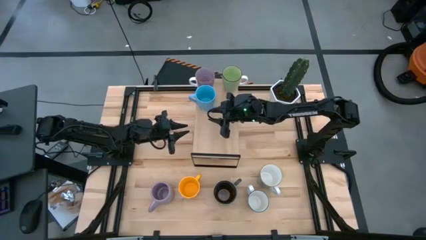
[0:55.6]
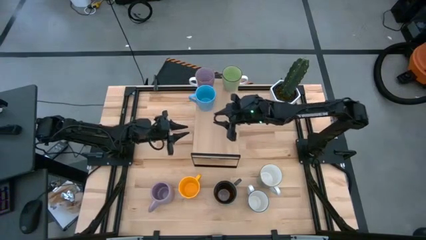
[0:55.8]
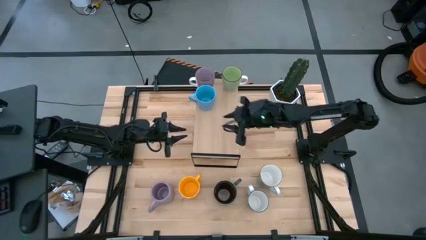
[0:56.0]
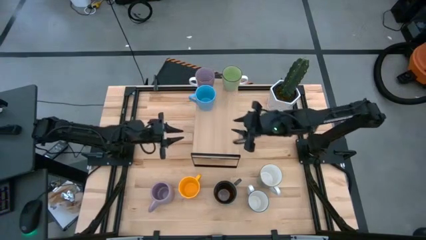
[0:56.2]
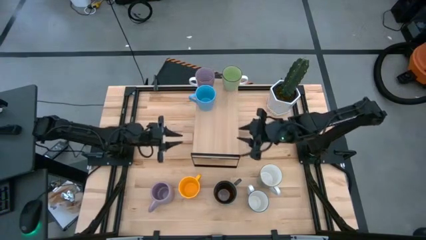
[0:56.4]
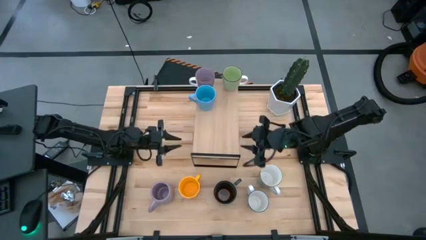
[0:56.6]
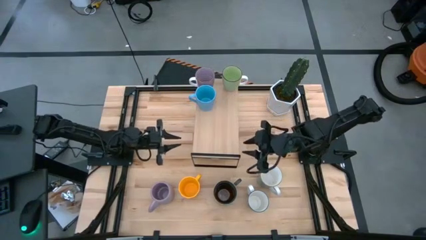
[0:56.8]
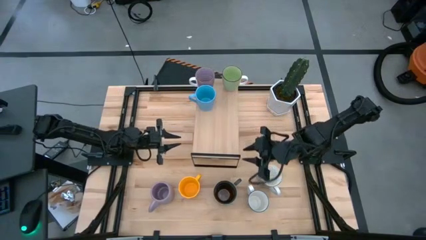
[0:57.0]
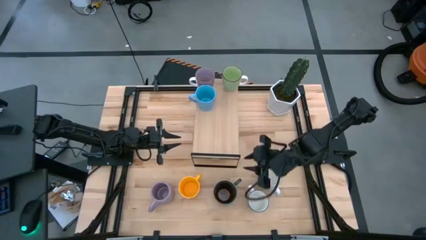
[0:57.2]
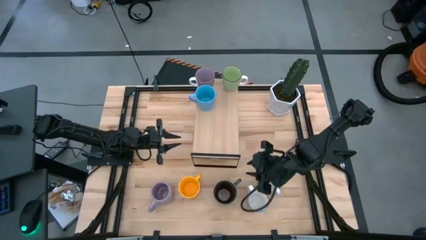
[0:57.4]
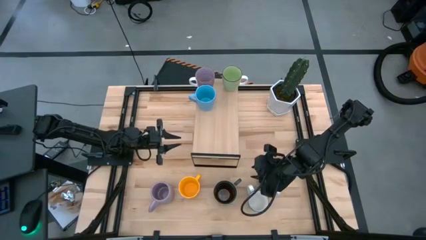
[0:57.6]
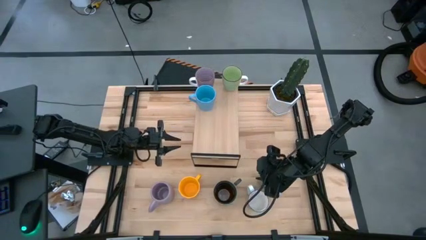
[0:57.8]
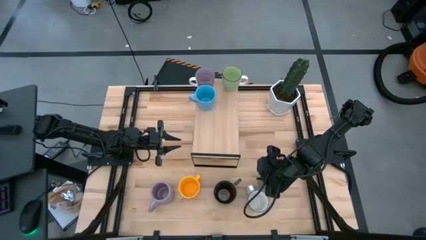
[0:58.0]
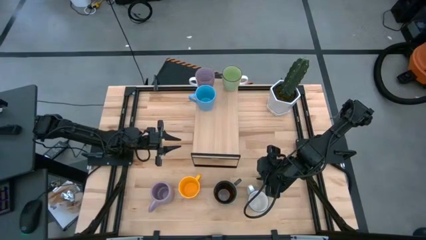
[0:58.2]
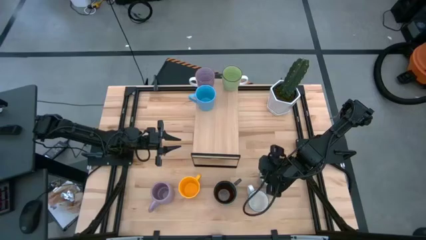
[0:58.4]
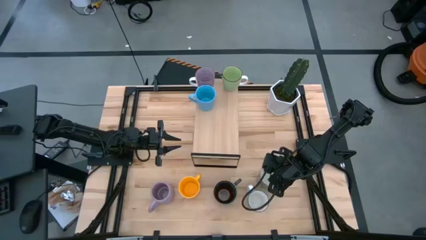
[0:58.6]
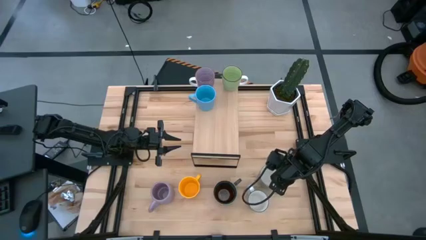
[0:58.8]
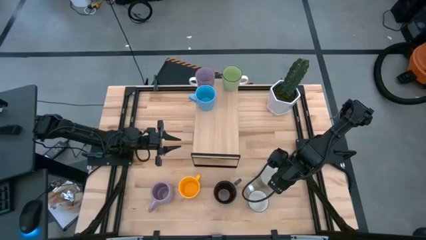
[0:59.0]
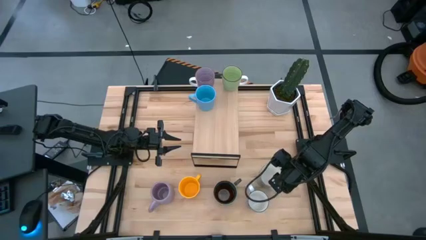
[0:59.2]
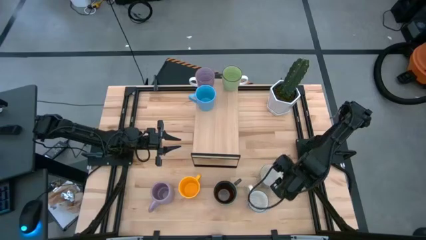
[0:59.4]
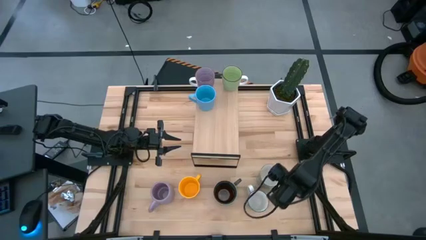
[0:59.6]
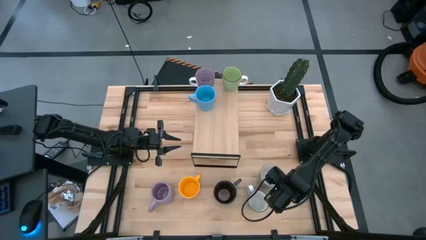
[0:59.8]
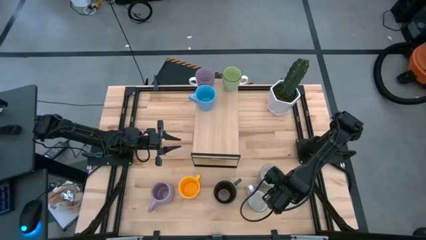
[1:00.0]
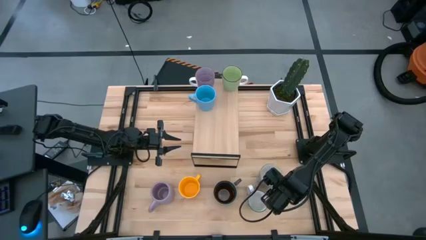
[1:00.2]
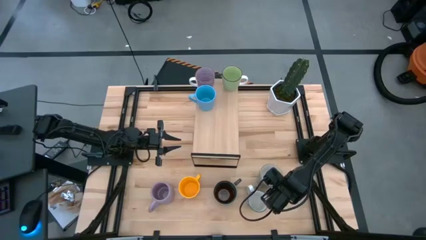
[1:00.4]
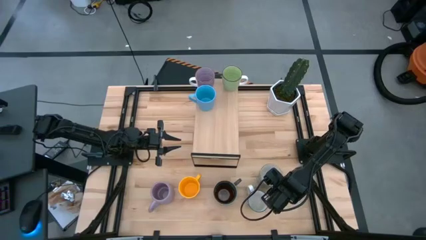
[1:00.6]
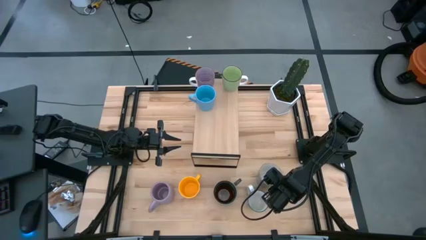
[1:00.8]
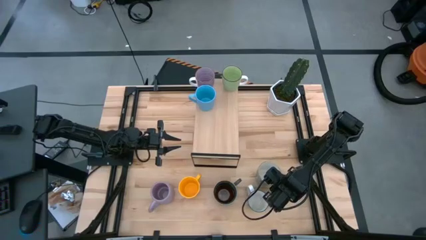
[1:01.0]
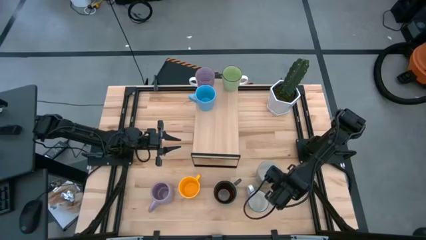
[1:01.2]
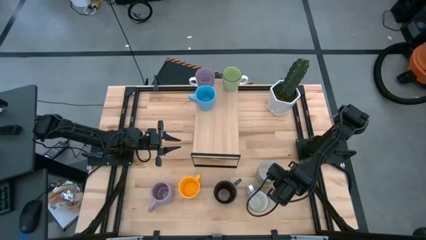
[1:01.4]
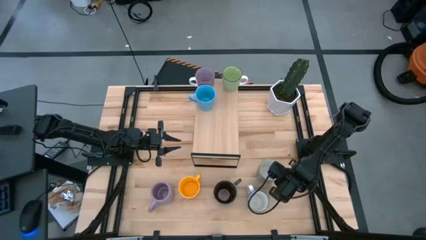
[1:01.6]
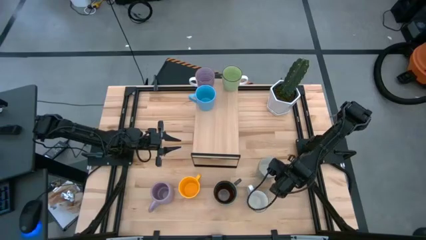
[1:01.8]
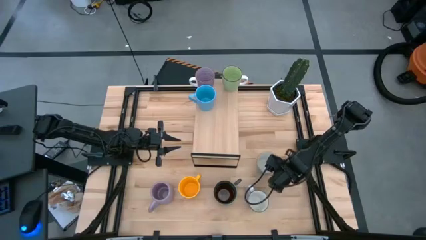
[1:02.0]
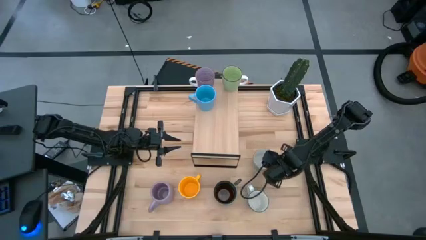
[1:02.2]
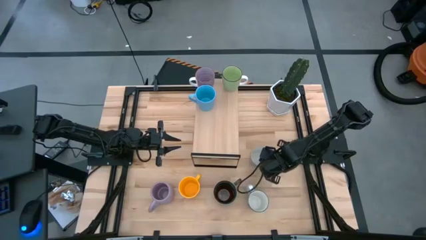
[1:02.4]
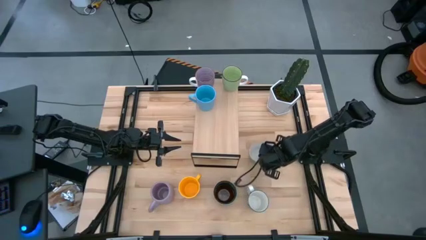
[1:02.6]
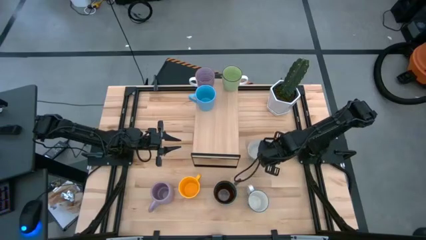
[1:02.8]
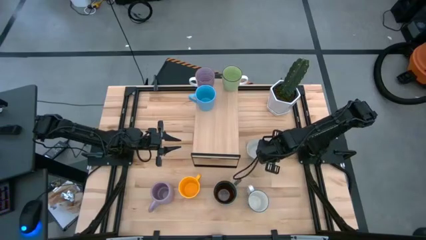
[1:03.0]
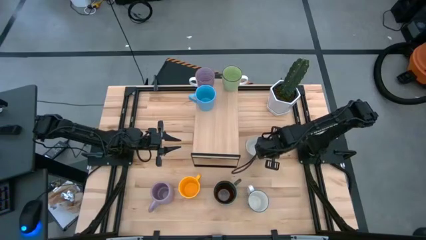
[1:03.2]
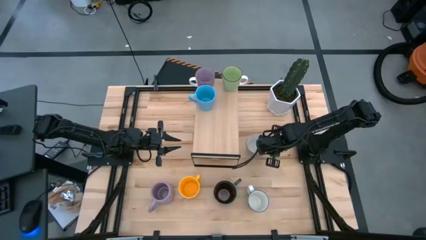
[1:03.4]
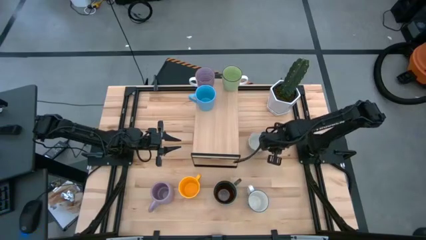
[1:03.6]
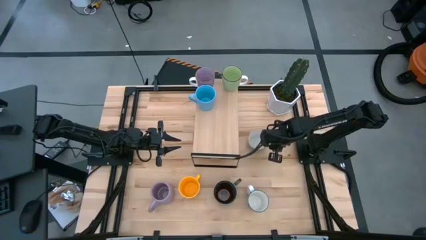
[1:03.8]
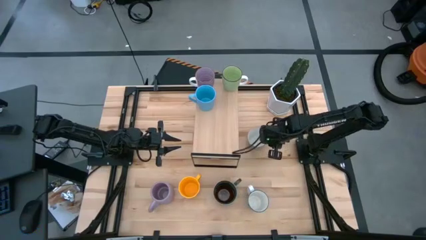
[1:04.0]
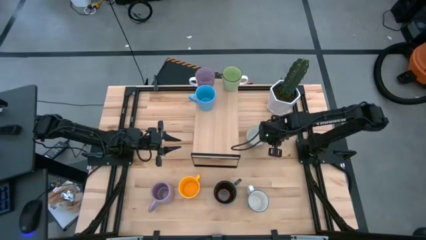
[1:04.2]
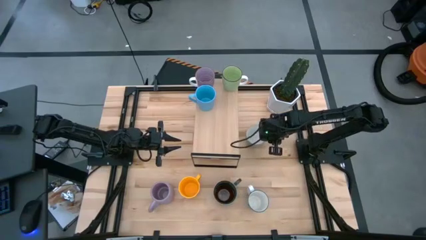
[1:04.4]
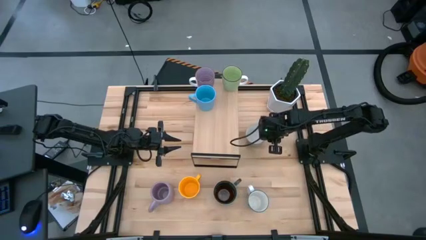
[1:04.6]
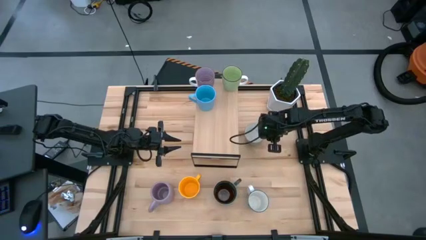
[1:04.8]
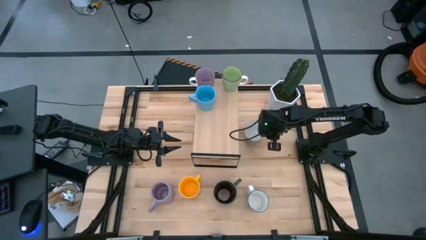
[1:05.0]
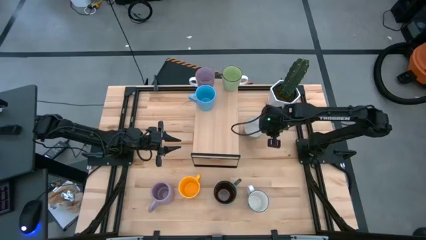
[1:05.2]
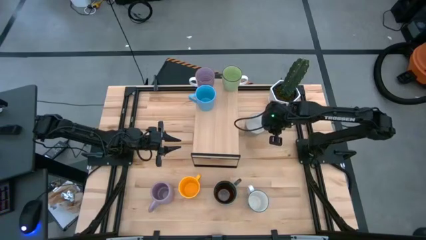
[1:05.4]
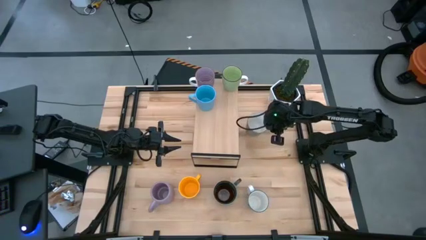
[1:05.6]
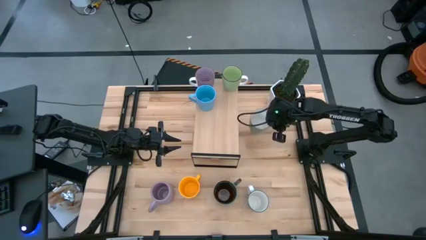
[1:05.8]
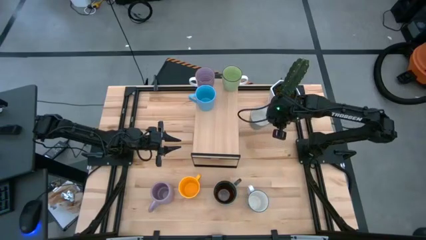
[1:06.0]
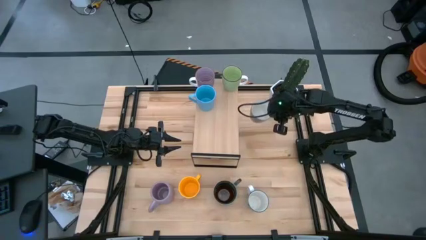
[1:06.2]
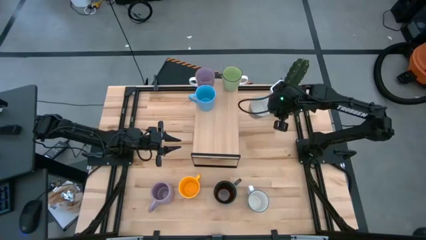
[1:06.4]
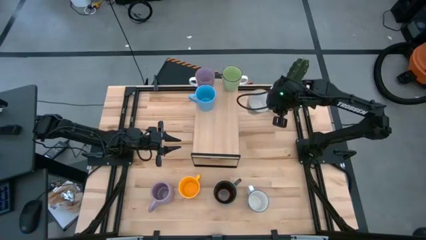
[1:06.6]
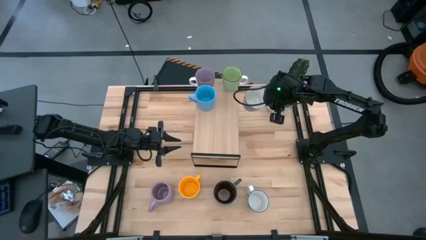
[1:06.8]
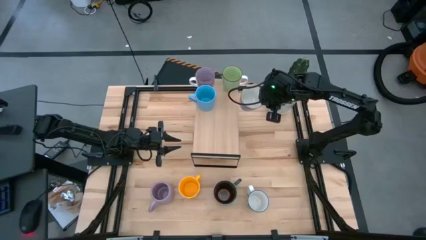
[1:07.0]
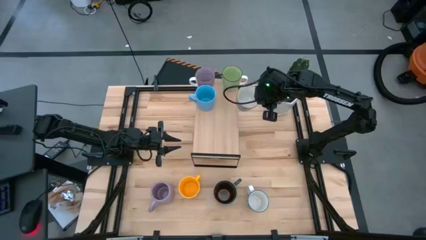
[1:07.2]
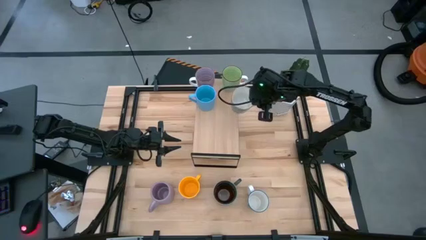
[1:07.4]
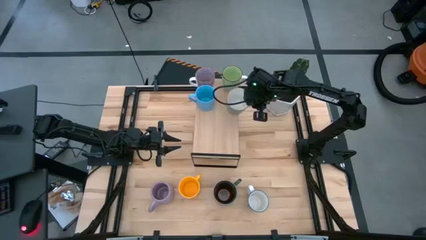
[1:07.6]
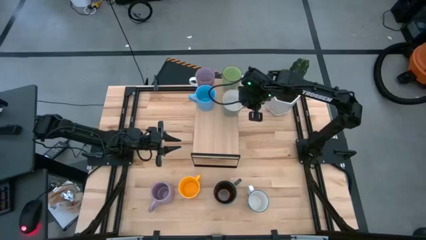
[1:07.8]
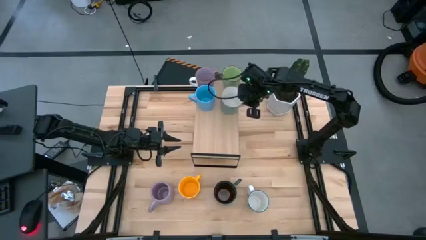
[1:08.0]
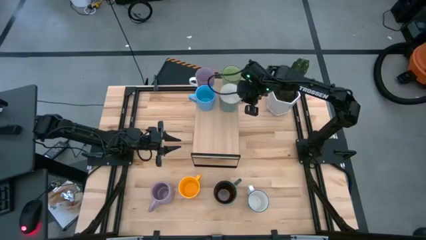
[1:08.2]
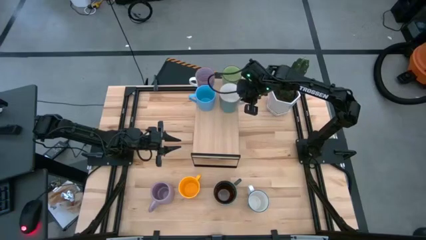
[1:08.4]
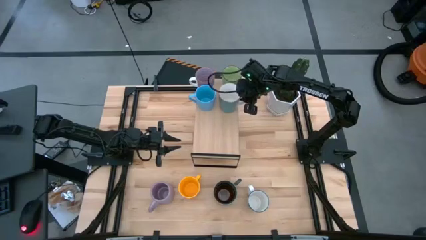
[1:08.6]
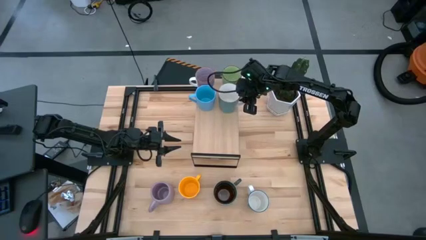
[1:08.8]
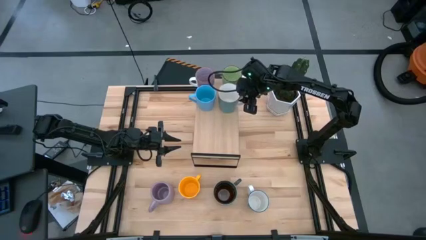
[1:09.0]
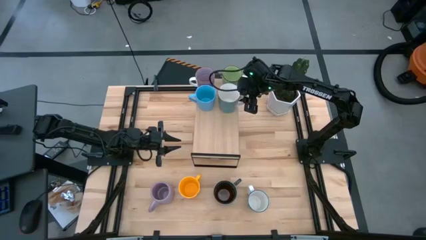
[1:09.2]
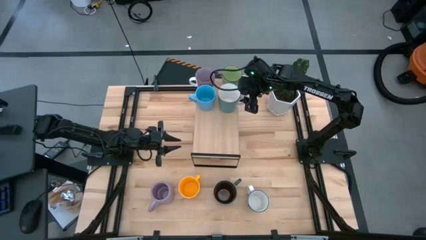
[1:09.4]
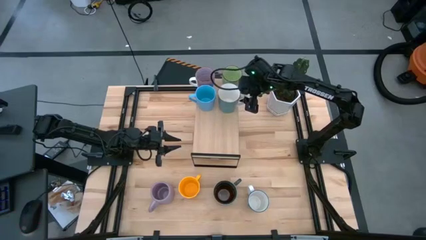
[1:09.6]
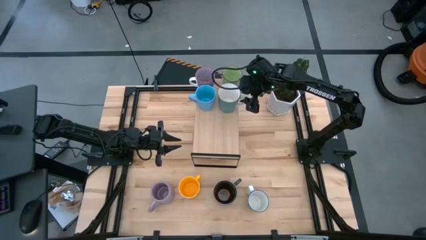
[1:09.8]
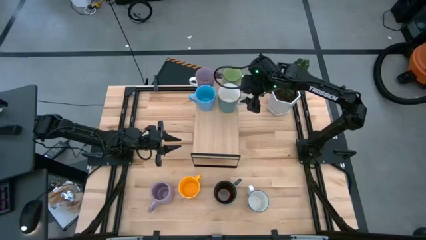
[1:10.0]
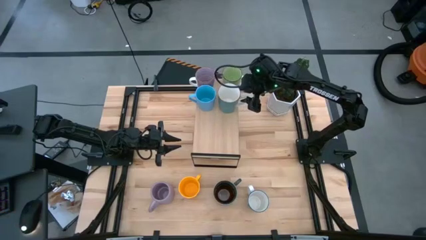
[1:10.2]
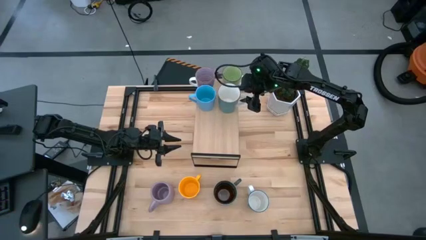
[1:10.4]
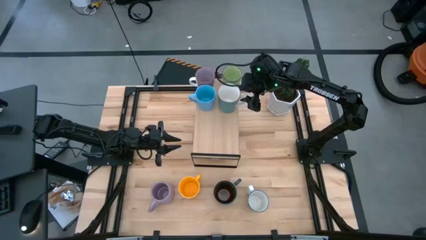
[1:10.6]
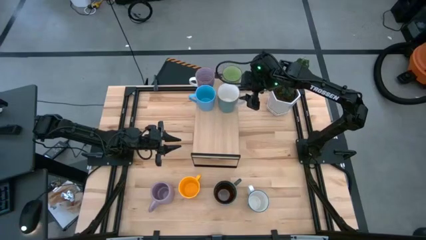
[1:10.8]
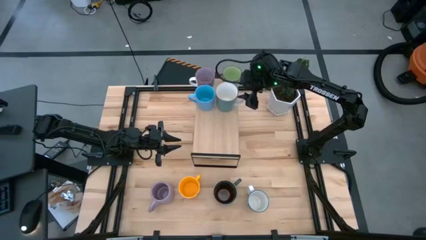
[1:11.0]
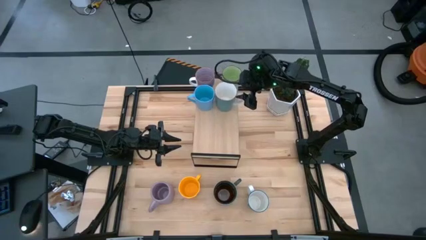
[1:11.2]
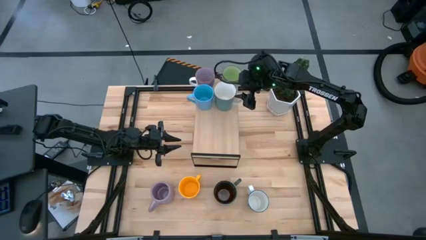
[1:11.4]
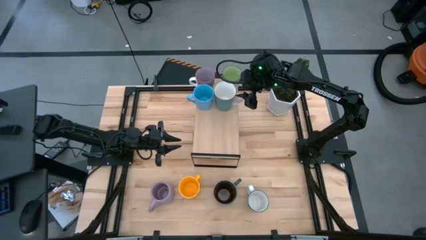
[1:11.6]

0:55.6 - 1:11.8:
Task: Place coffee mugs
Put the blue mug on the shelf

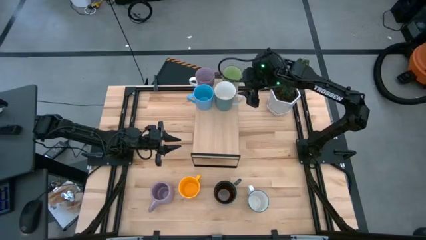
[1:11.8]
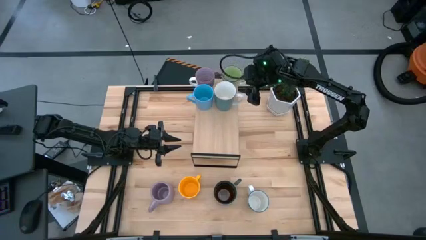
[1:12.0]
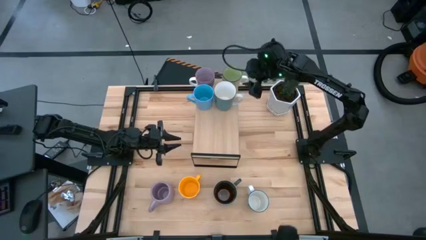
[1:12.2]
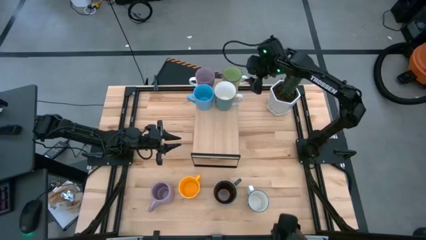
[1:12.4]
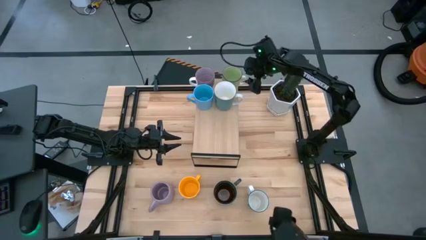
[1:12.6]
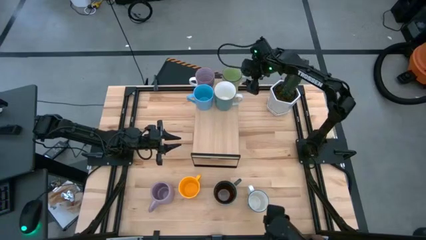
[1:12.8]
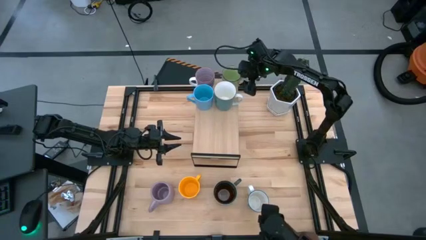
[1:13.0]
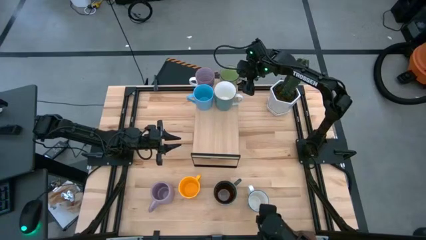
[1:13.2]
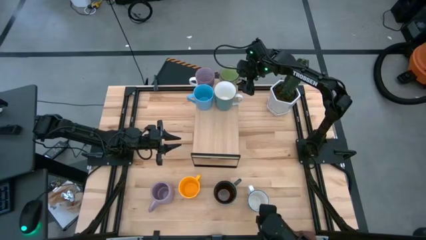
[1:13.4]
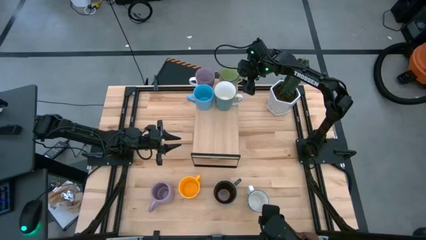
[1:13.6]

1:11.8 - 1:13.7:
Adjust the green mug on the shelf
